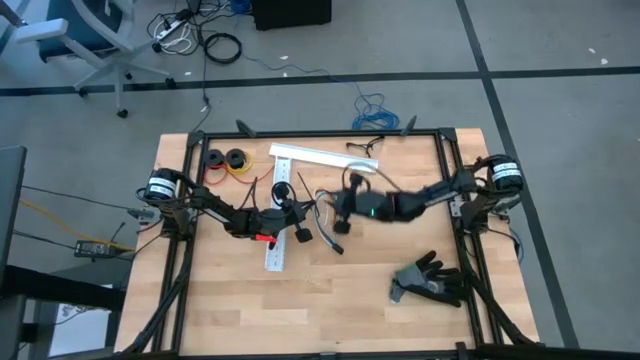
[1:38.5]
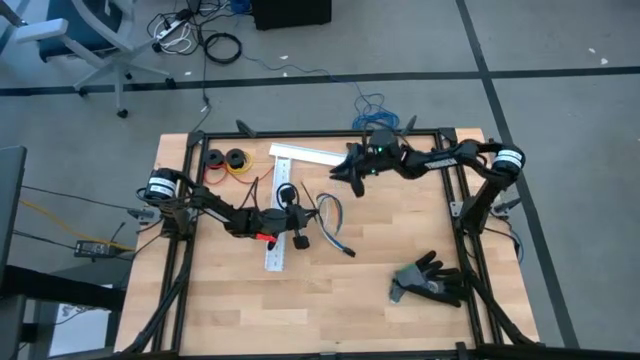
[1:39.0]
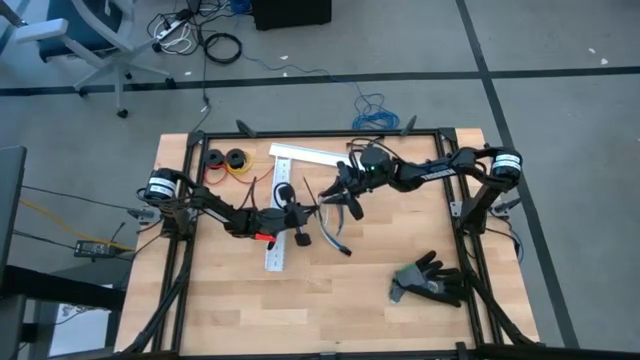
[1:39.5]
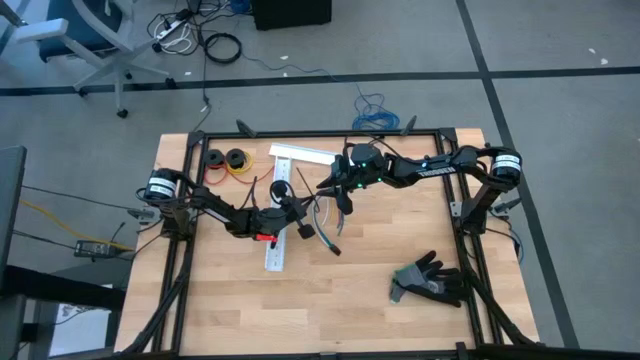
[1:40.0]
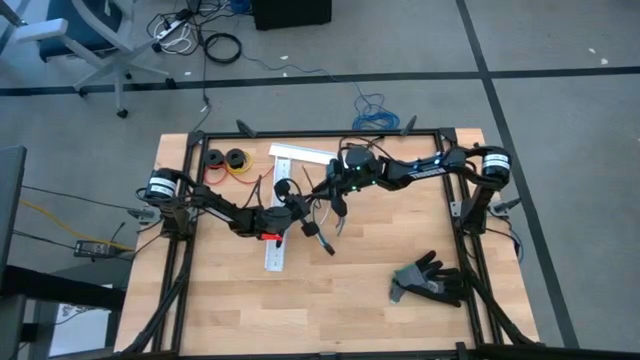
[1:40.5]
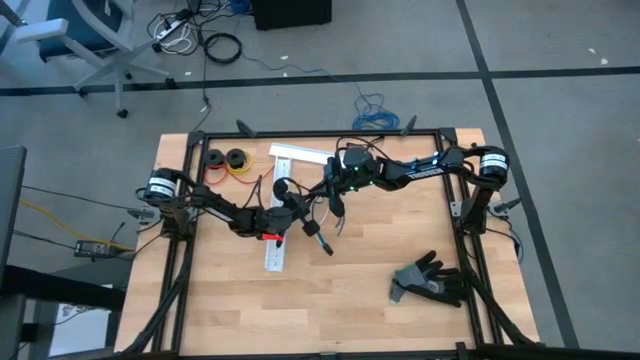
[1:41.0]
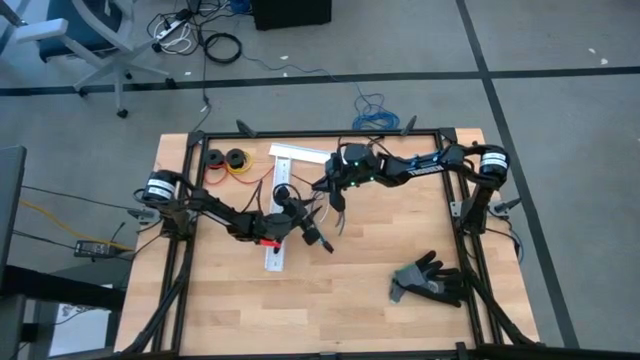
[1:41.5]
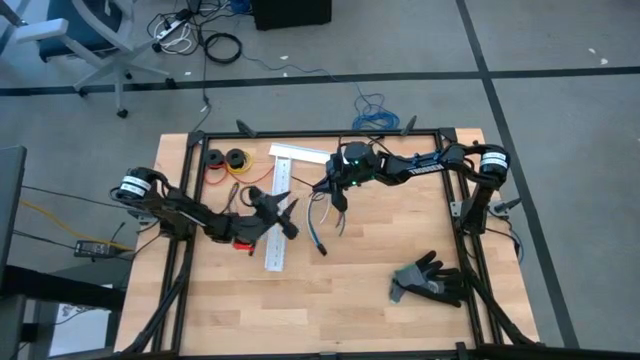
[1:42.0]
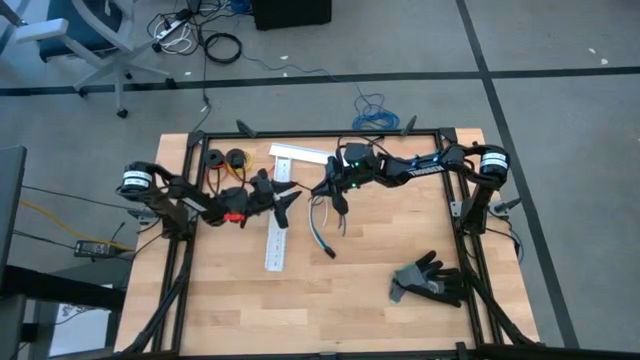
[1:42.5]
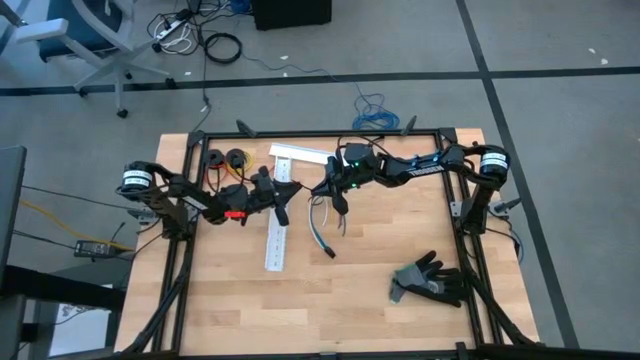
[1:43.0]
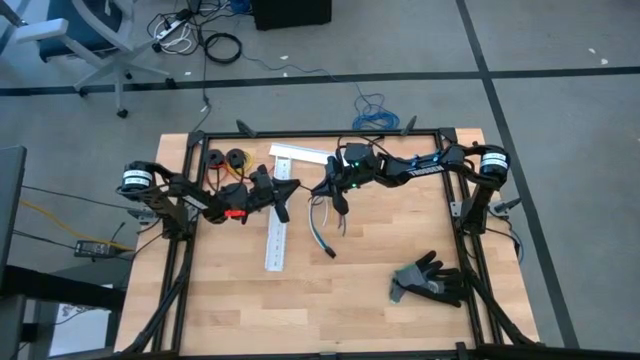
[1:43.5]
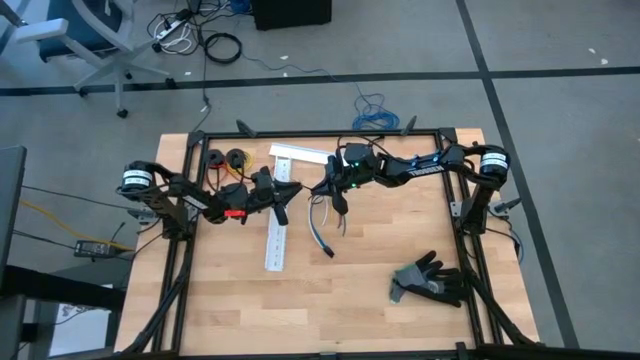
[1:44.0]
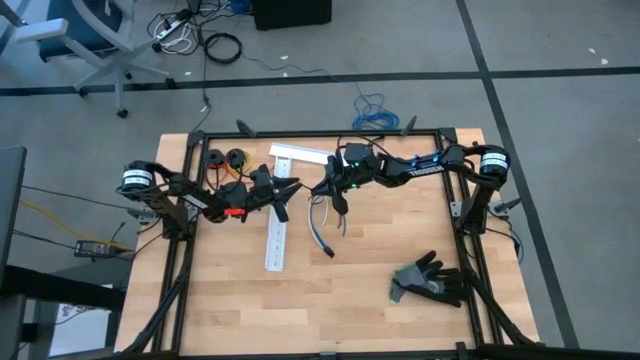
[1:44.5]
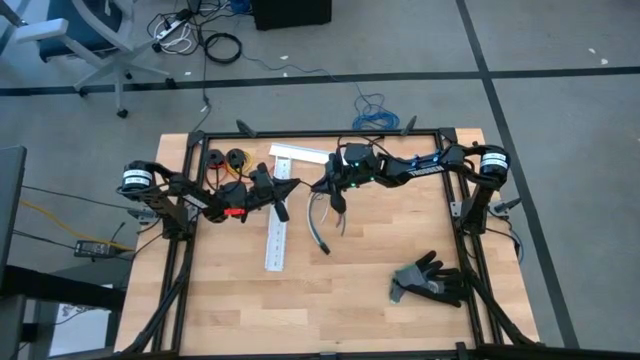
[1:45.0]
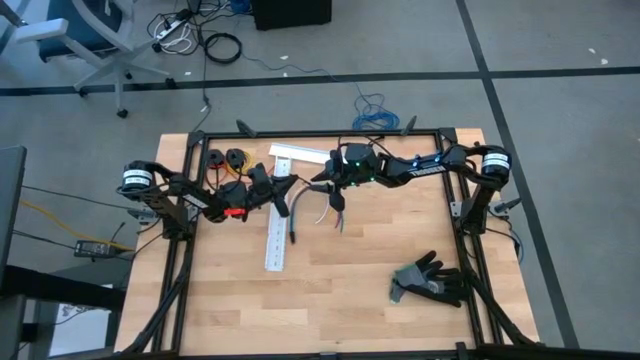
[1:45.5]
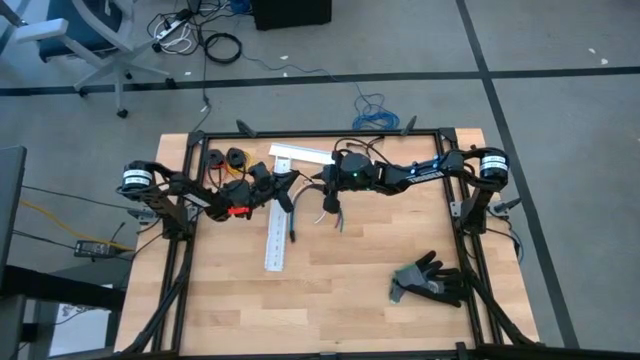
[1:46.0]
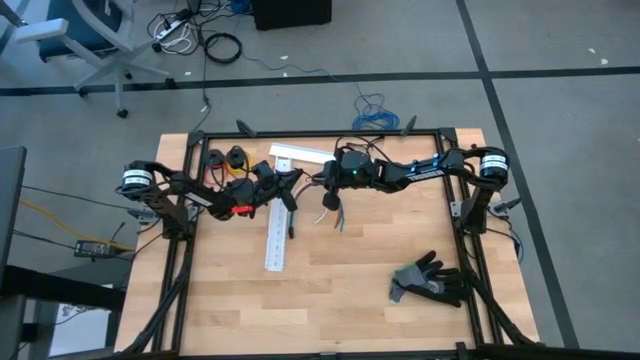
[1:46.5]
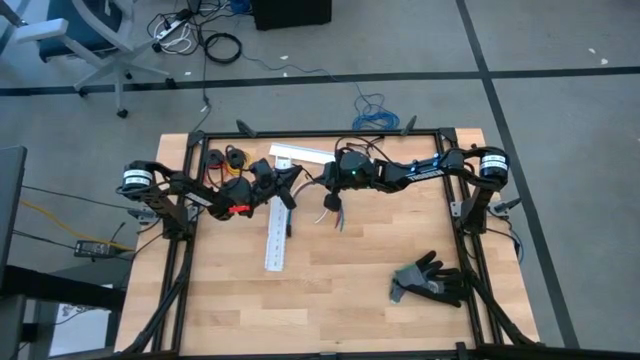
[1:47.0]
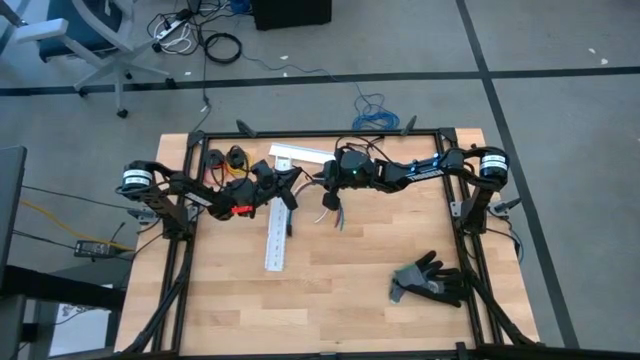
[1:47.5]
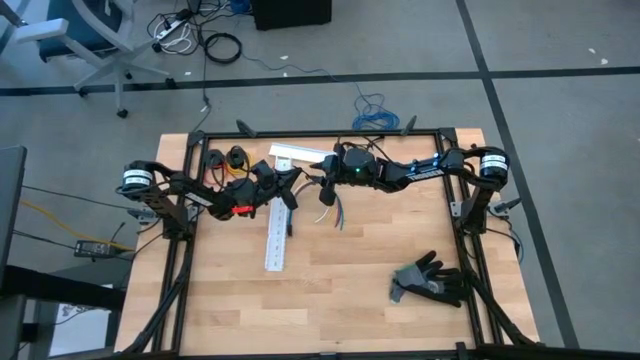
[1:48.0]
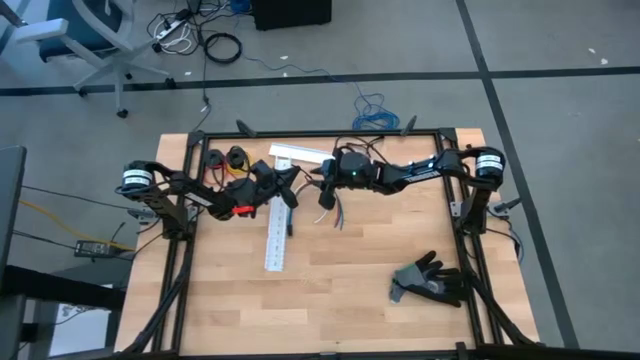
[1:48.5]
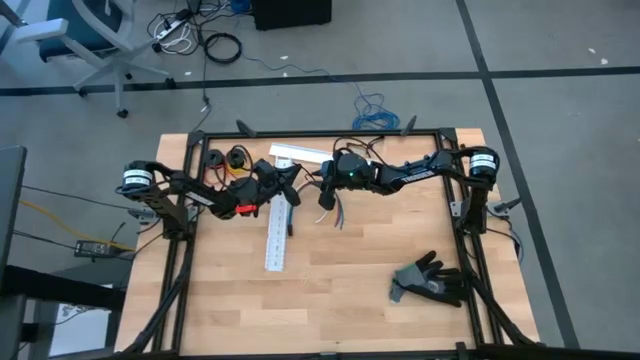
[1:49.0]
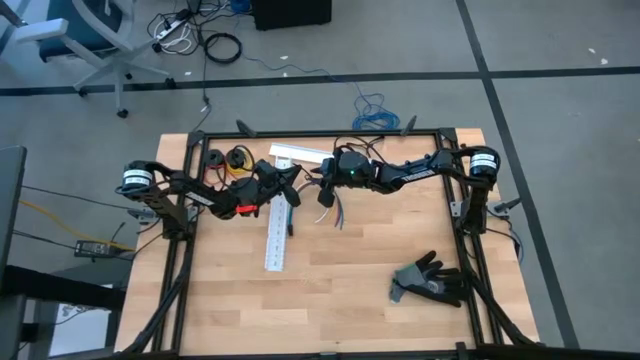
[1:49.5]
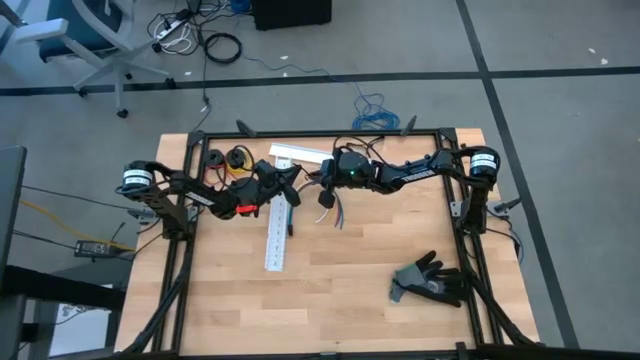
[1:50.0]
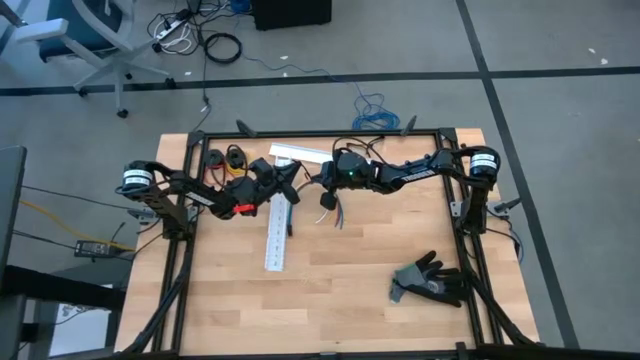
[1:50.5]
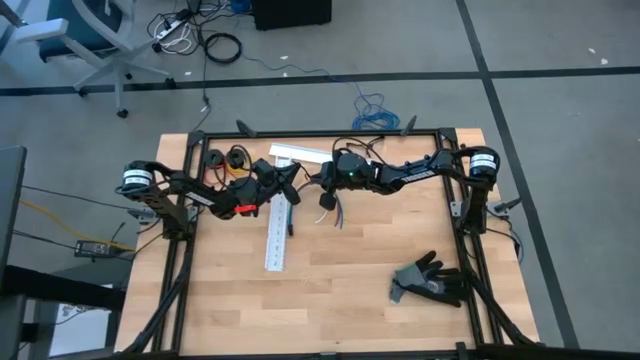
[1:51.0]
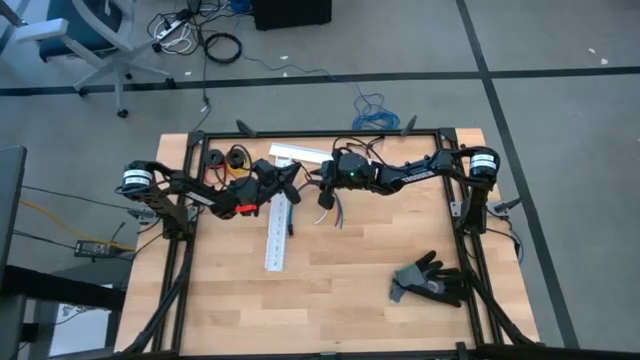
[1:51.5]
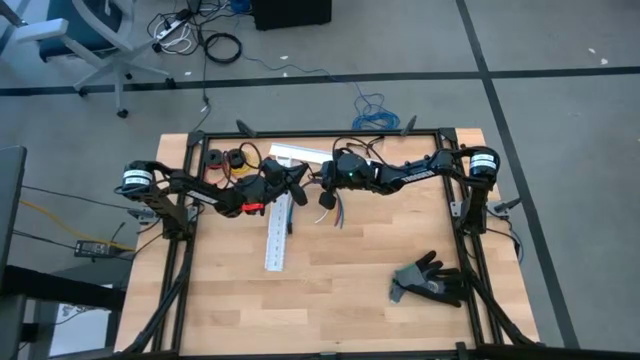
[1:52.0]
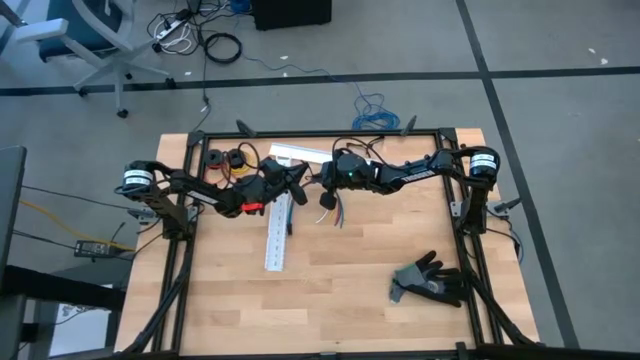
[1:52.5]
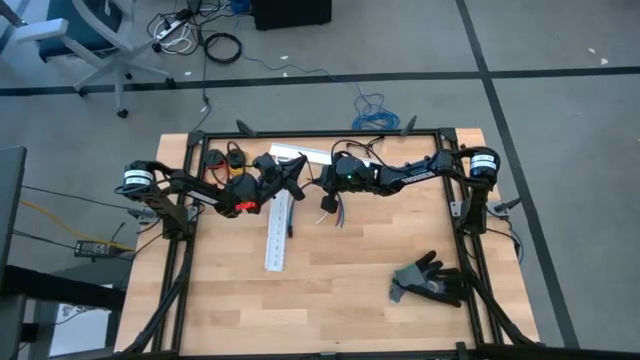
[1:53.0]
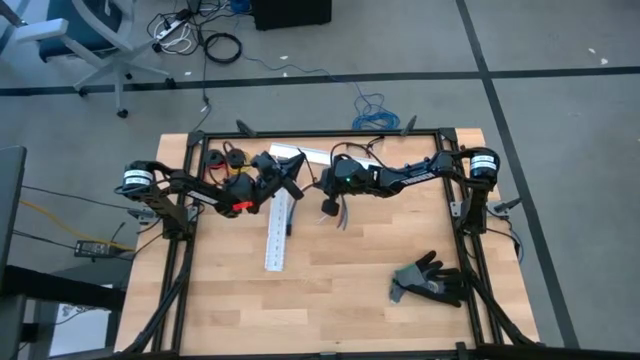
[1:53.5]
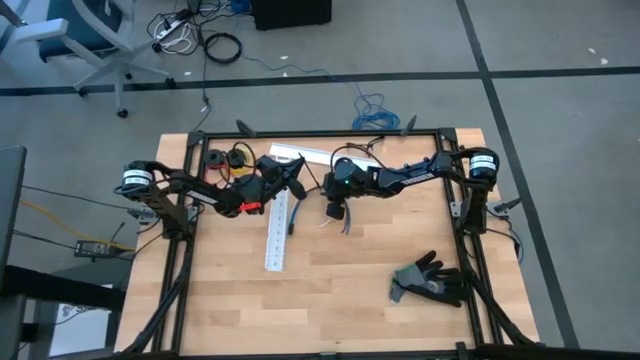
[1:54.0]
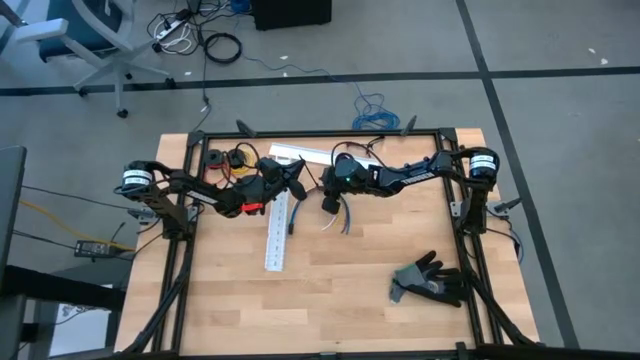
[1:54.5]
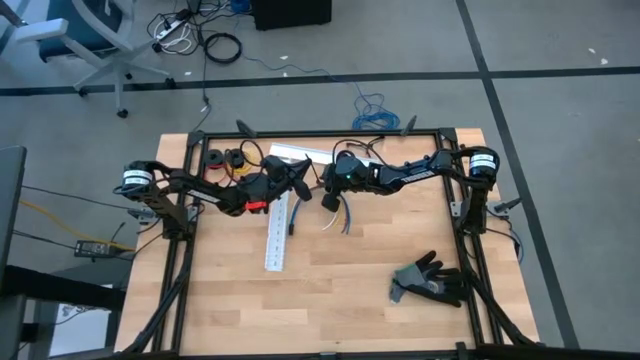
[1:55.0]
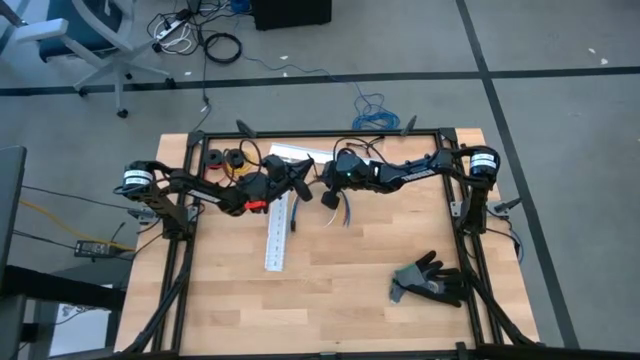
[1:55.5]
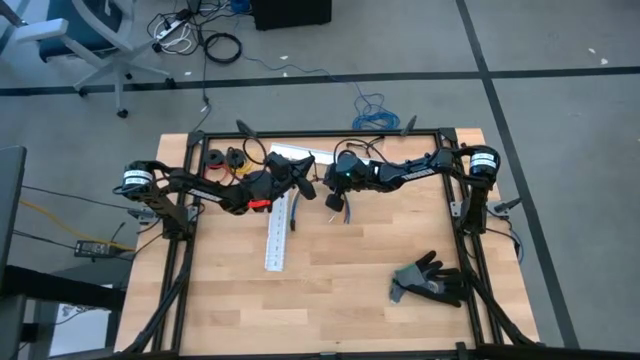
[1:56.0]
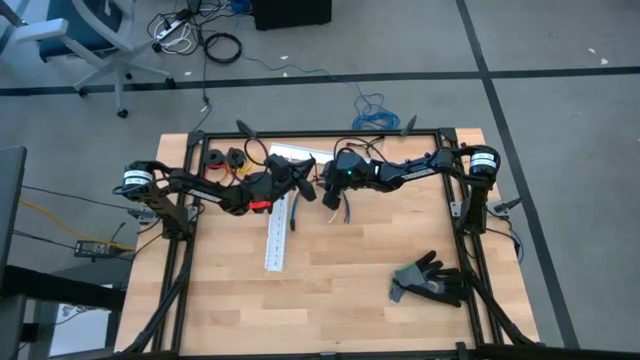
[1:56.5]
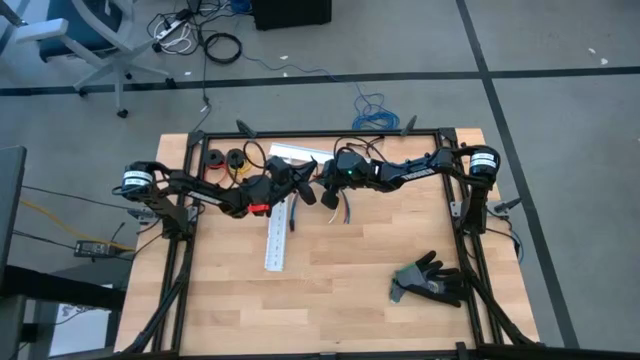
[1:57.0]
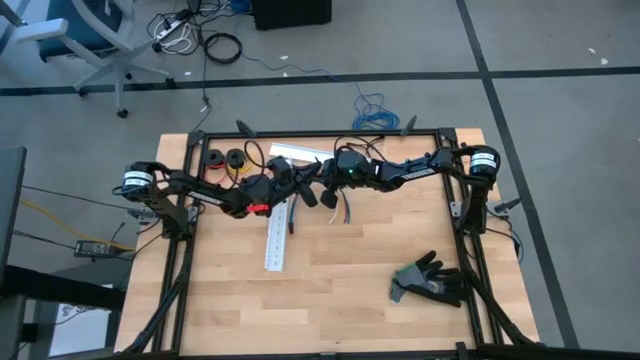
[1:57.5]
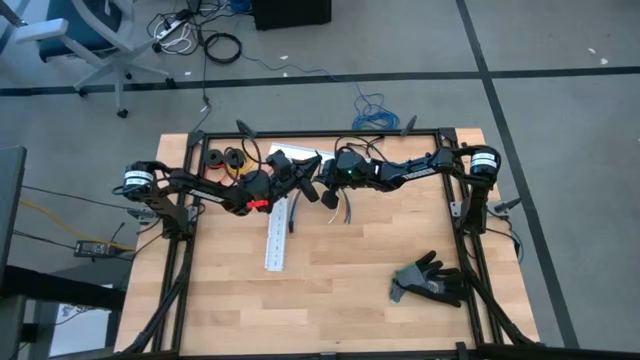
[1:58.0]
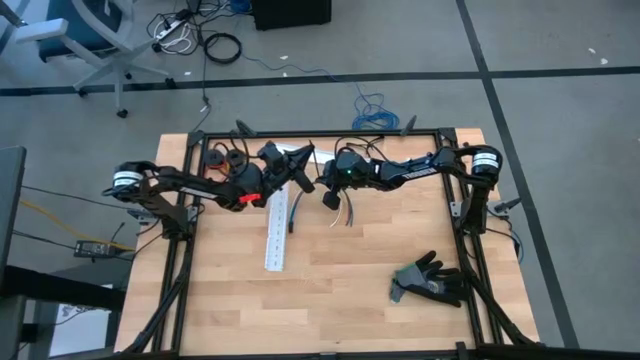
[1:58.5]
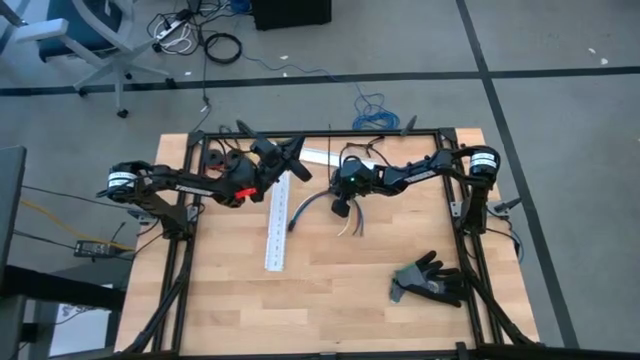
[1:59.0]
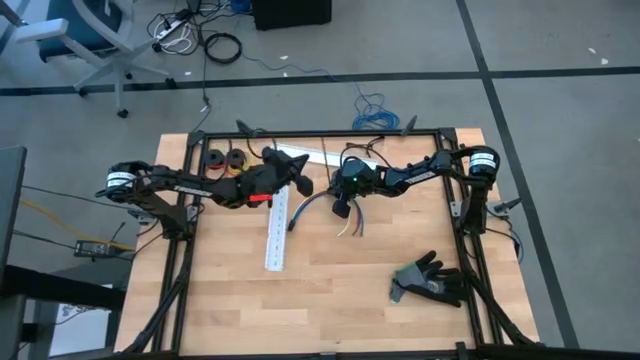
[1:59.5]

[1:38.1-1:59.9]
Task: Ziptie cables
Wrap the black zip tie on the cables
